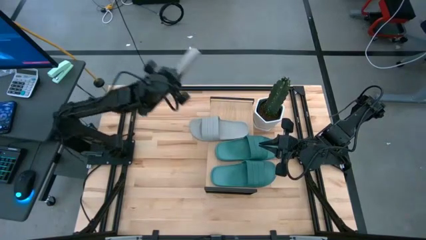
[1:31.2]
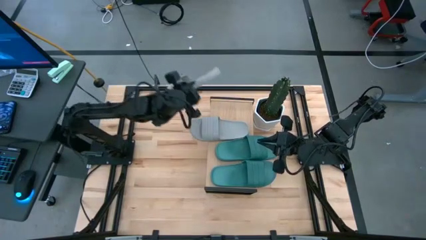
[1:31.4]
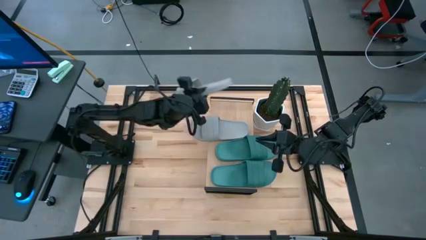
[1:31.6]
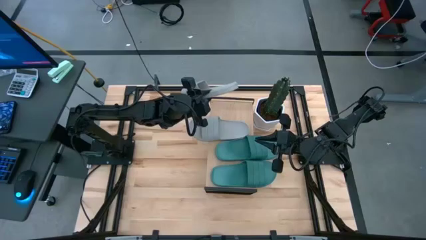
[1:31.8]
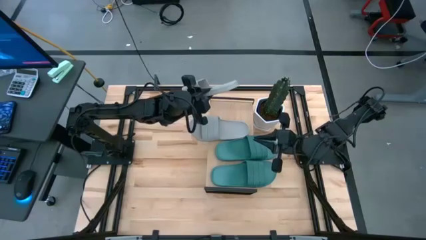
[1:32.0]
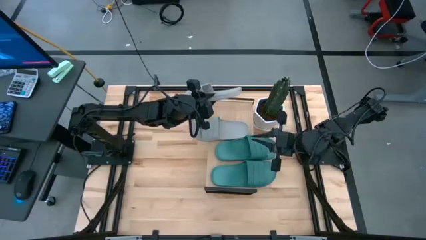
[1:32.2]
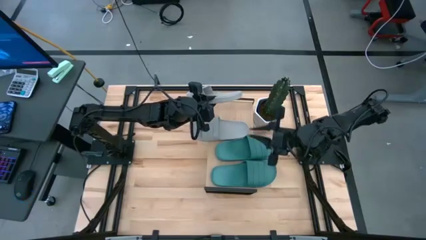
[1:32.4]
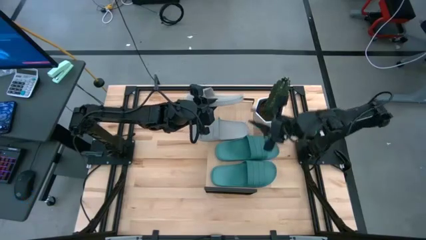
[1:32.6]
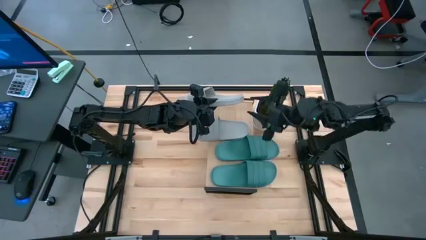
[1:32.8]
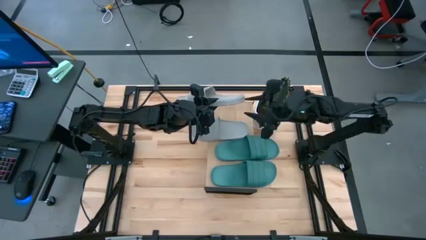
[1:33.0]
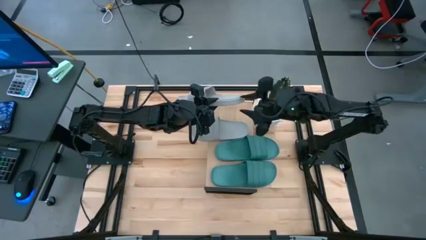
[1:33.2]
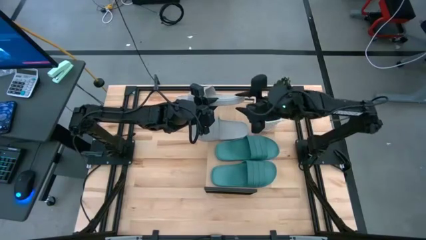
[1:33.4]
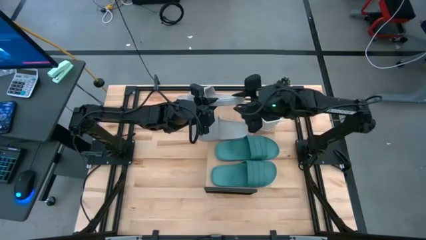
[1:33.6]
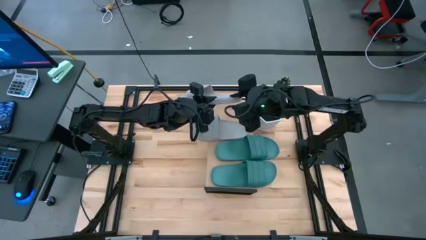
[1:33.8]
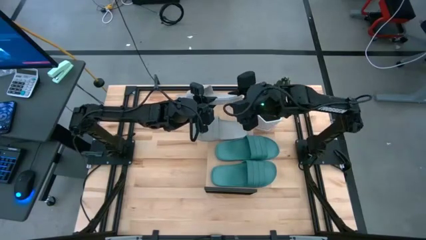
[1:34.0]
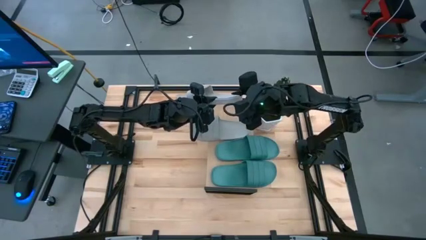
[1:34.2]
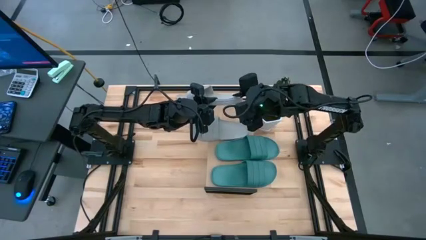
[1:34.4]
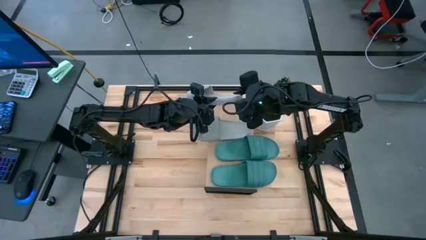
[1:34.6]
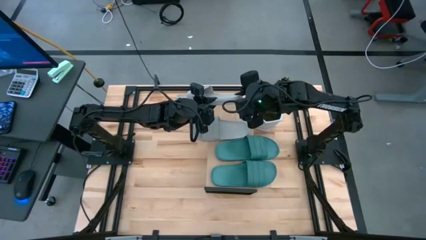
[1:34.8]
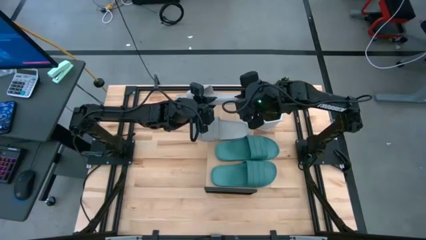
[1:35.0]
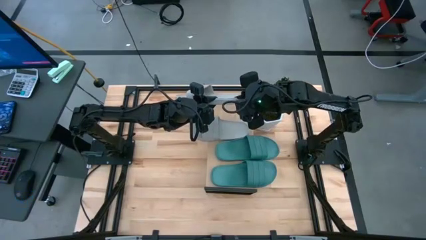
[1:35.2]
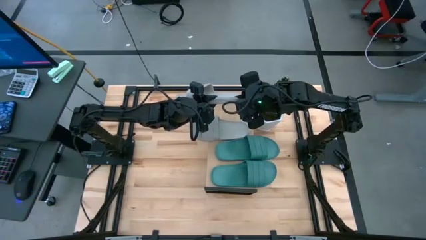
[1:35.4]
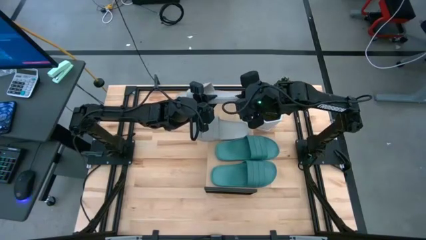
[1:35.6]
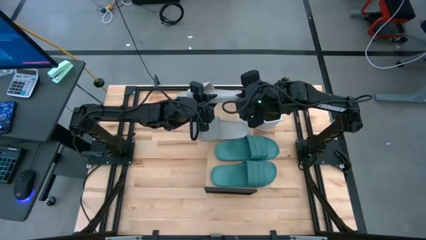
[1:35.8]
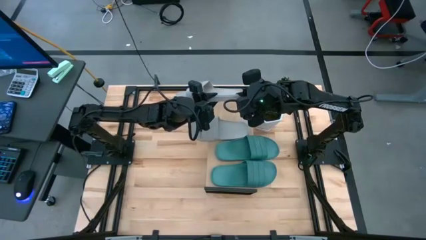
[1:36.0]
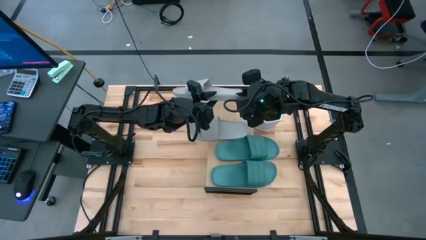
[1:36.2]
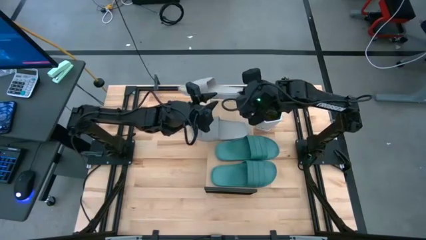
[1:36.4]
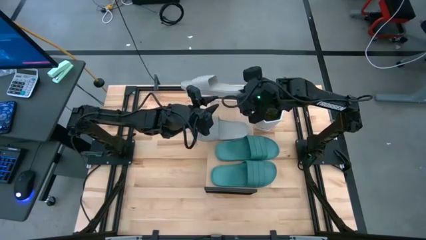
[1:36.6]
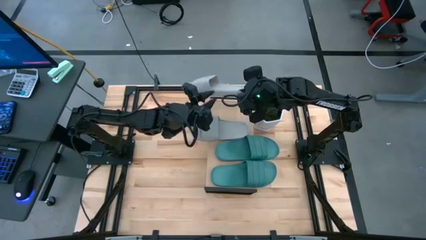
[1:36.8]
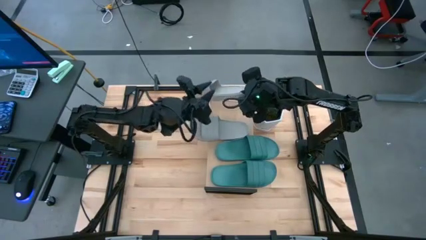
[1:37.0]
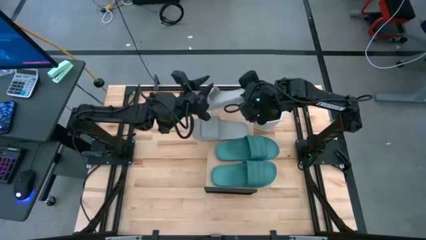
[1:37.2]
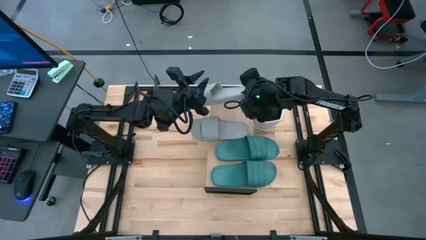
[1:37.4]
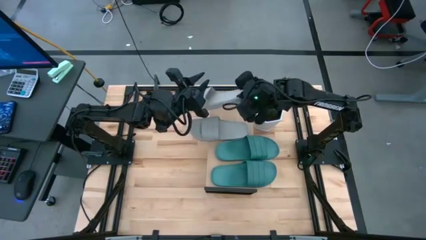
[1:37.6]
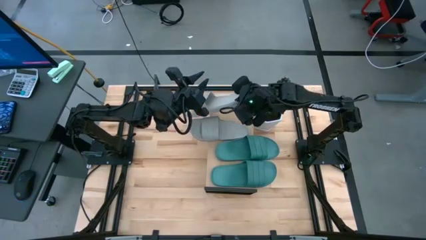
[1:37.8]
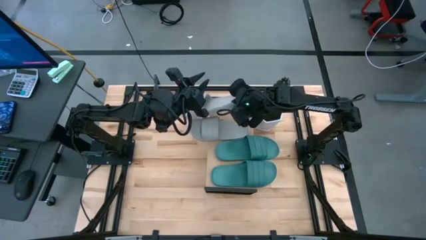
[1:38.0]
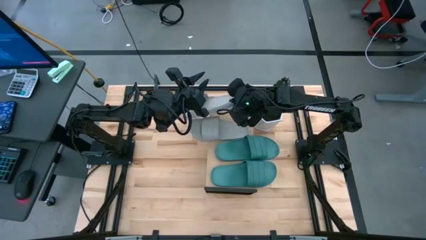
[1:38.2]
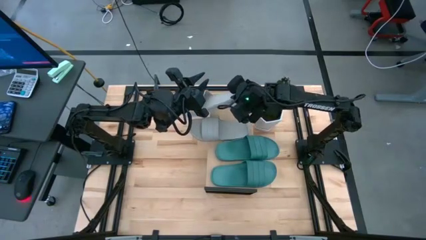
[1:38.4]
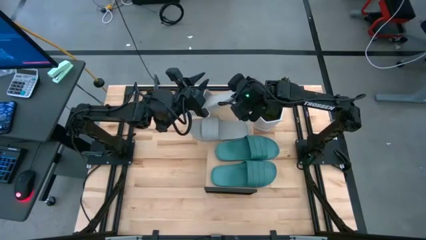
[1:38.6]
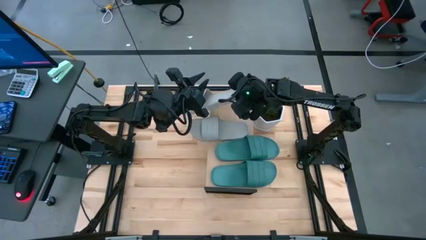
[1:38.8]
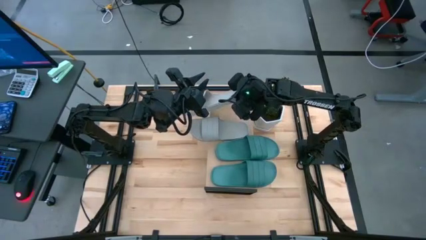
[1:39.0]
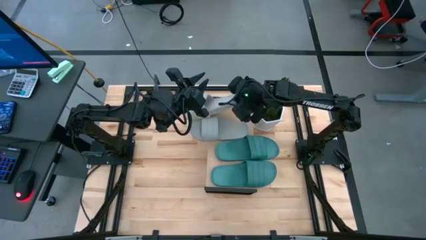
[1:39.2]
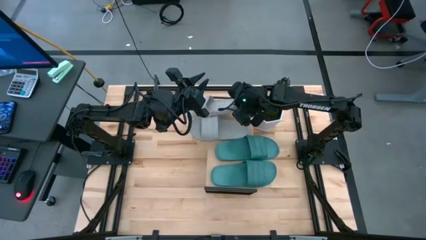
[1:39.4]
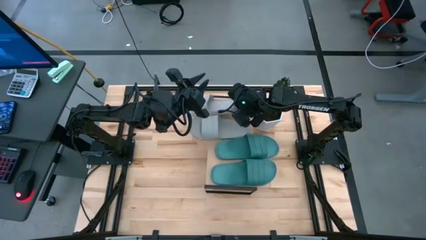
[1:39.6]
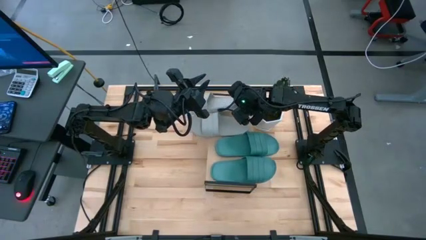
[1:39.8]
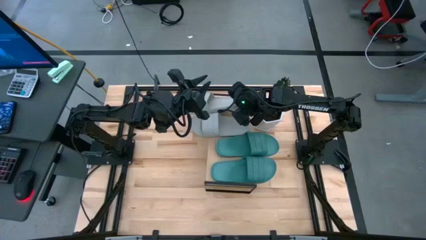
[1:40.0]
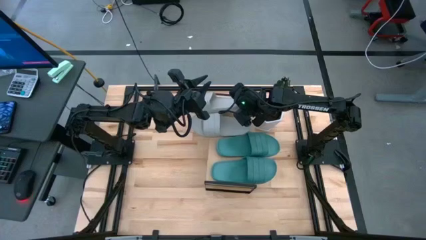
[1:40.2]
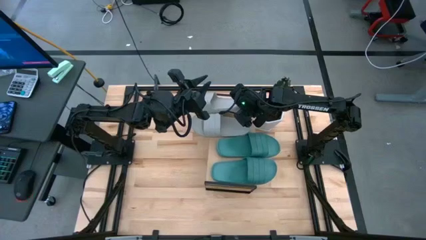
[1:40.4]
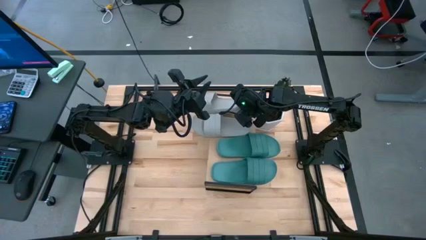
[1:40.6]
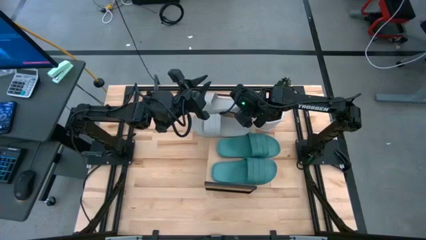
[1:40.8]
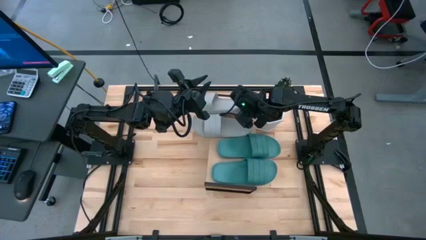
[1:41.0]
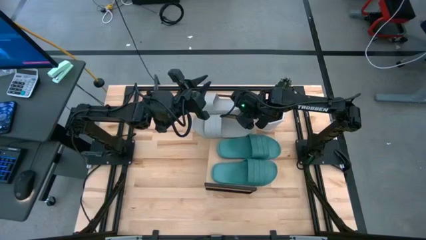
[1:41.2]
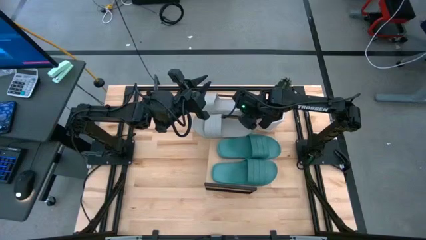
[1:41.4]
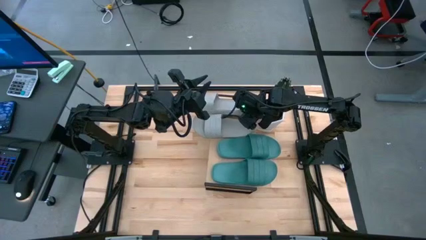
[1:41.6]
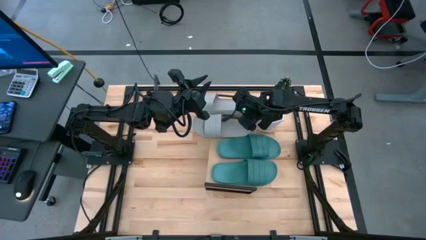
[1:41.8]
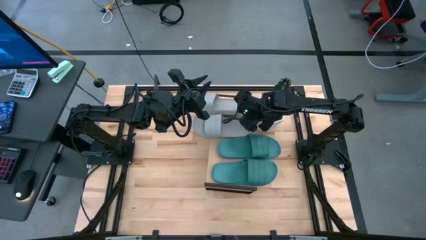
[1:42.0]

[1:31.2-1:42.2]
Task: Pick and place slides into the shelf
Put the gray slide on the shelf

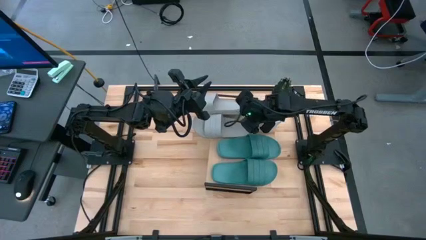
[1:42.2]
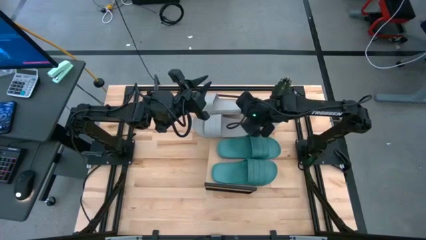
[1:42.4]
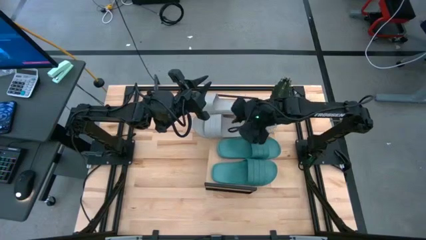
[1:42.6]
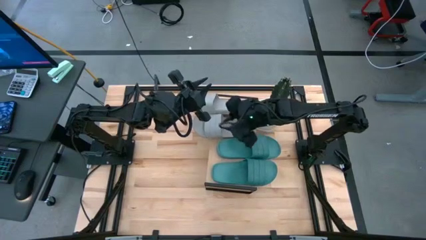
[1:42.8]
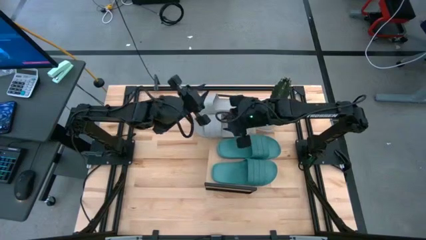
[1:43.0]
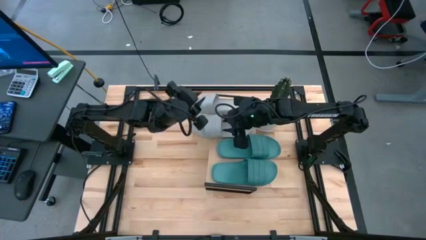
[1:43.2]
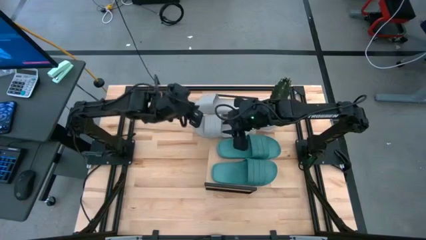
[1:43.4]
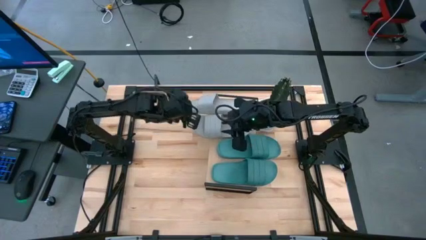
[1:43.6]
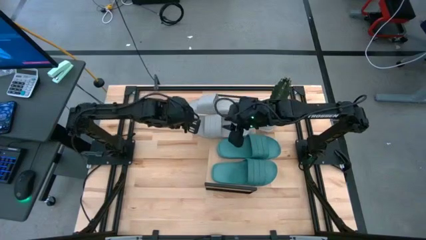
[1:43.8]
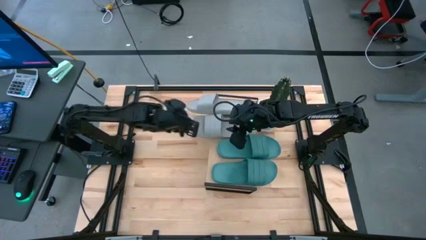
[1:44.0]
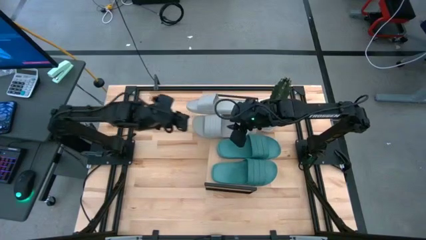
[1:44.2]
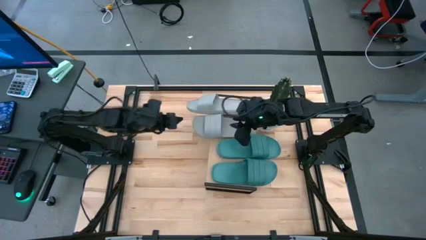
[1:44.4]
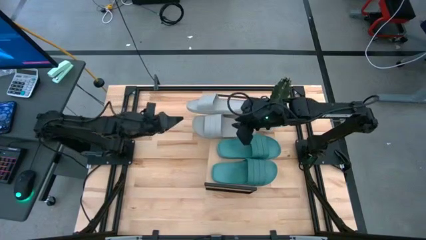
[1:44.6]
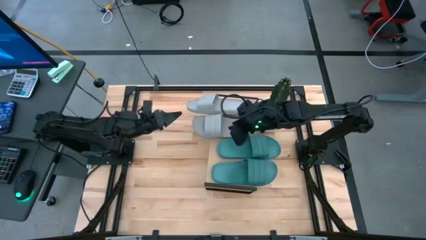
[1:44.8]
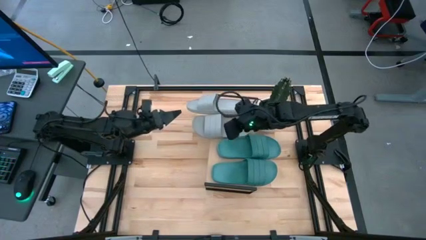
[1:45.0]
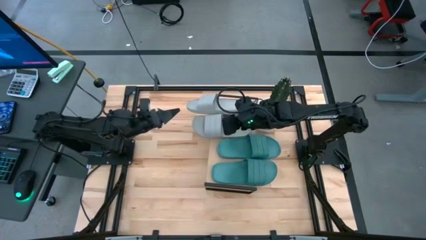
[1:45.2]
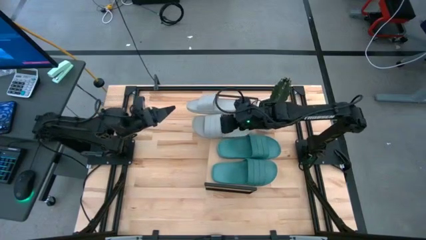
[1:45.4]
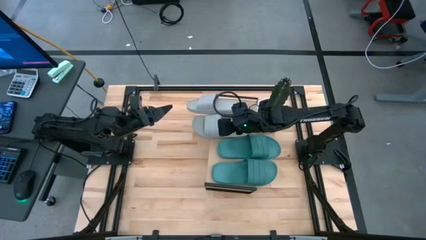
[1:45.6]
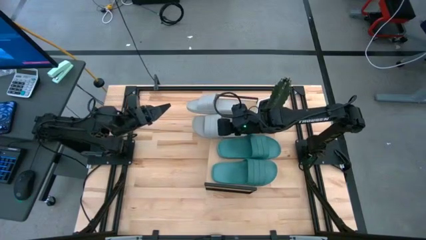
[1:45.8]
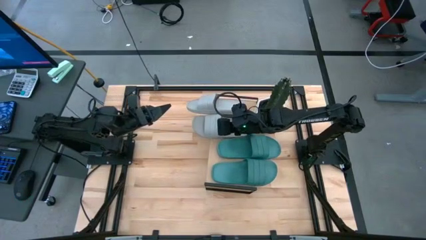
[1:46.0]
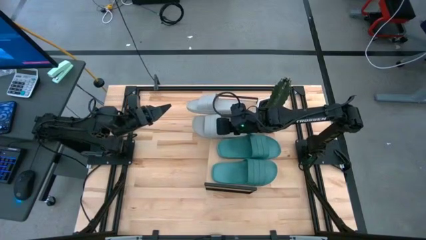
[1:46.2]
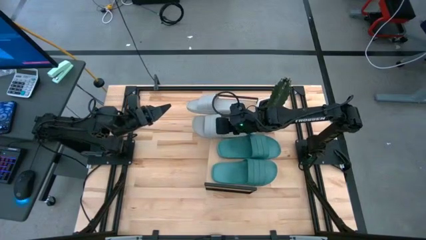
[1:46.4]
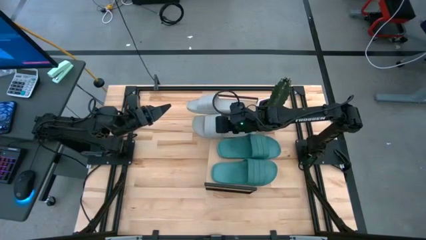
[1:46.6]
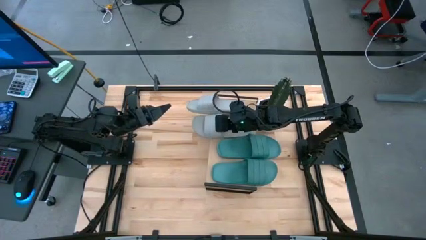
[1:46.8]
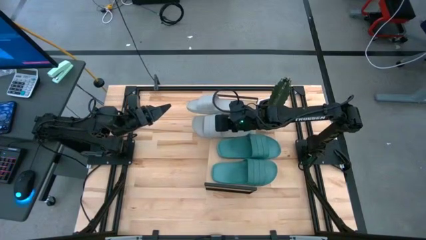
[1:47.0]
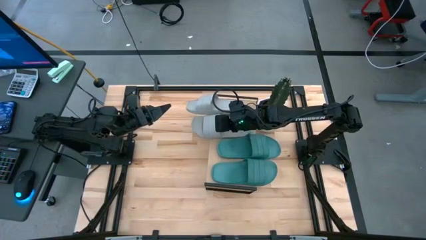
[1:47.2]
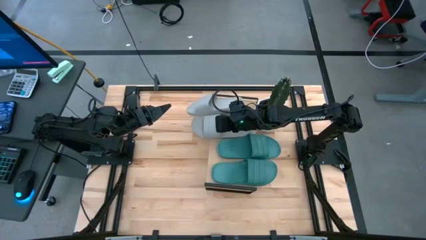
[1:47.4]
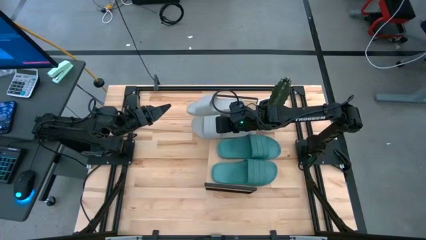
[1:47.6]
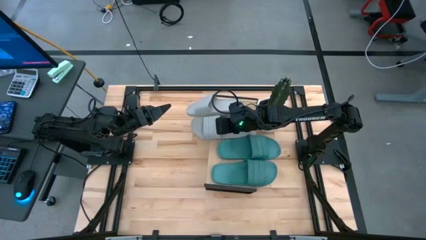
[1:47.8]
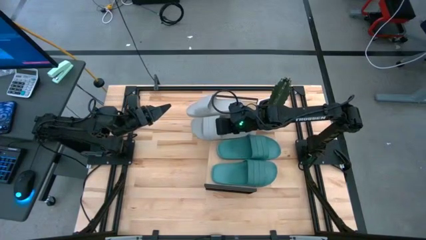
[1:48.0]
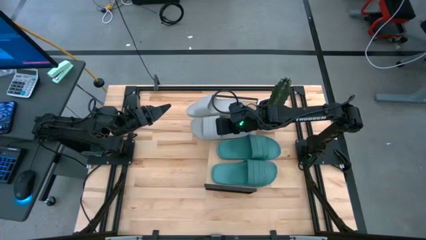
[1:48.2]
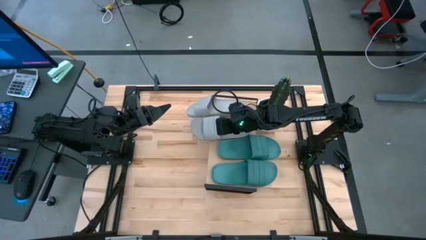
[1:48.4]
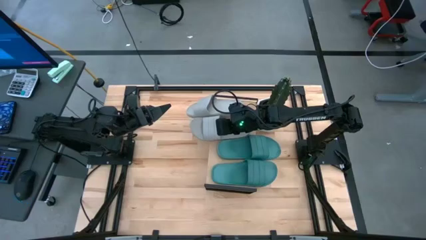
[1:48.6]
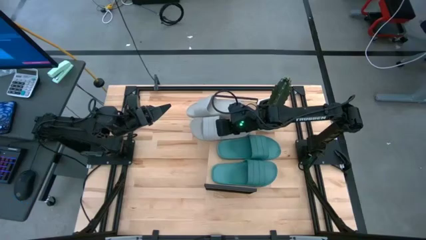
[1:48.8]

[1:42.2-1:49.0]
Adjust the gray slides on the shelf
